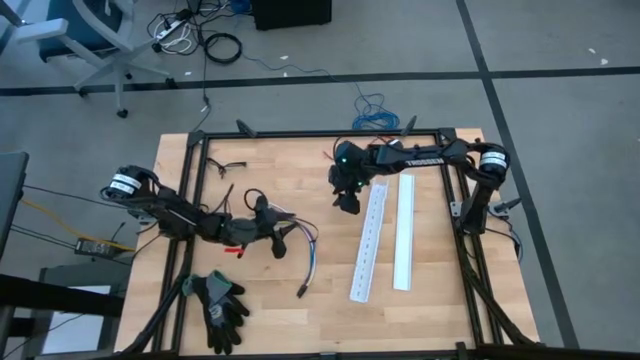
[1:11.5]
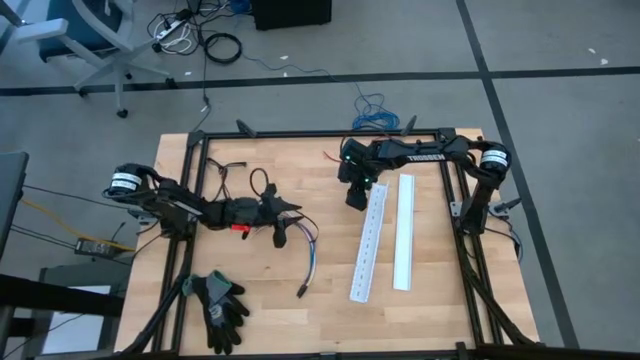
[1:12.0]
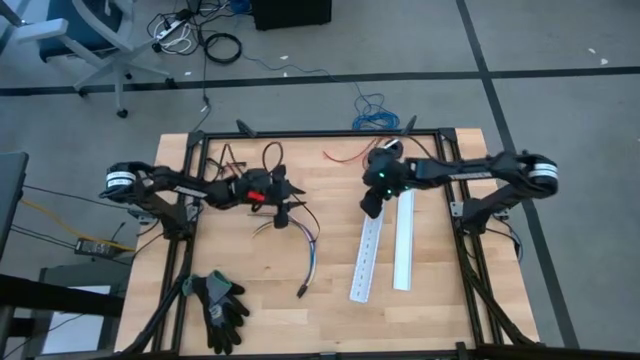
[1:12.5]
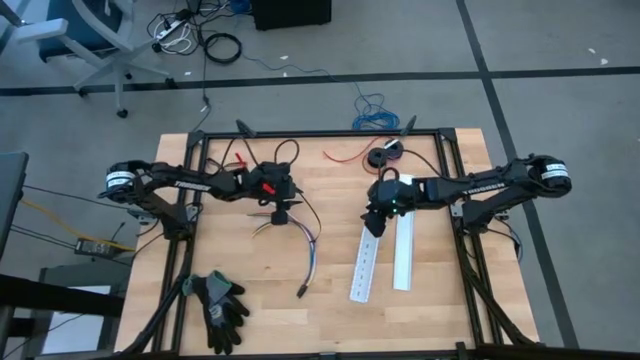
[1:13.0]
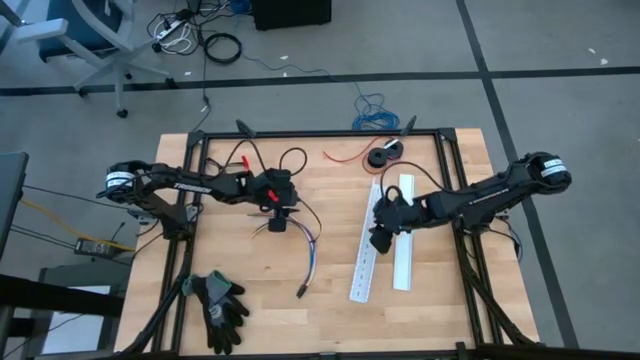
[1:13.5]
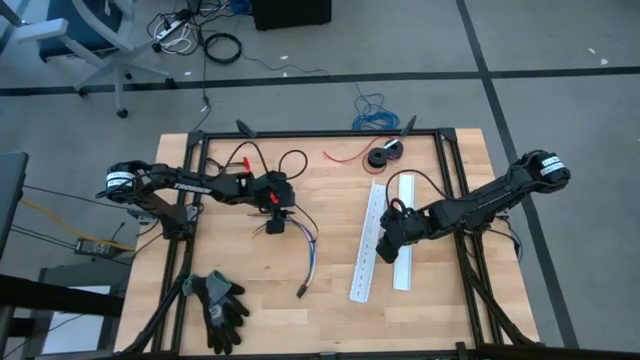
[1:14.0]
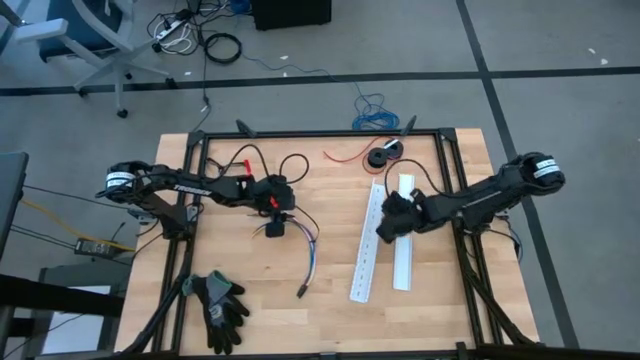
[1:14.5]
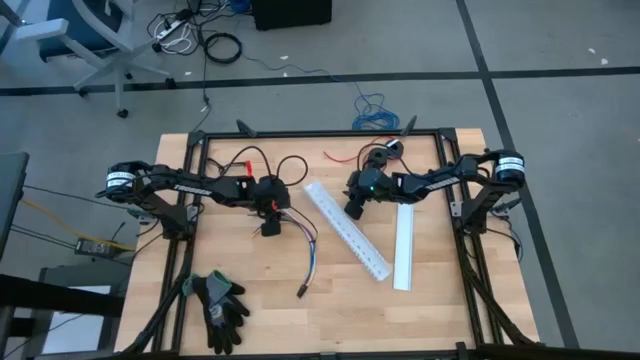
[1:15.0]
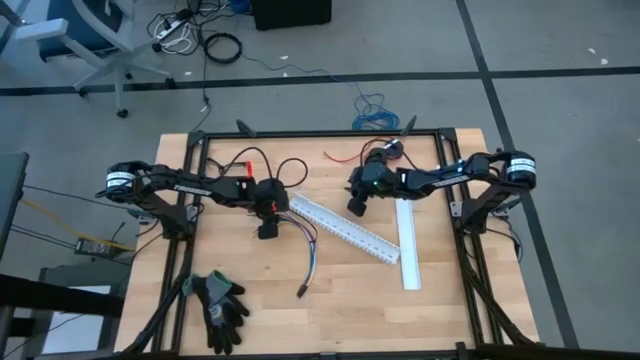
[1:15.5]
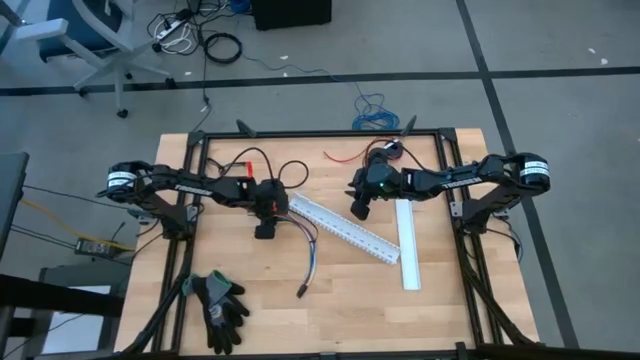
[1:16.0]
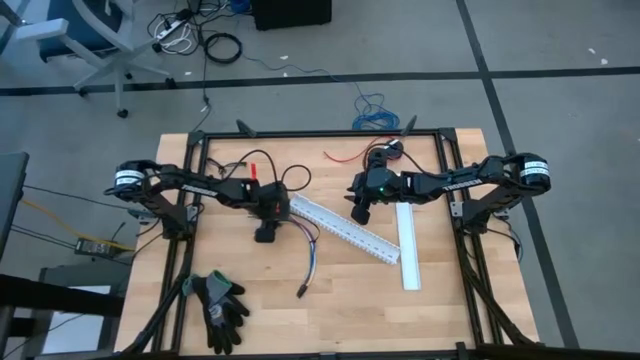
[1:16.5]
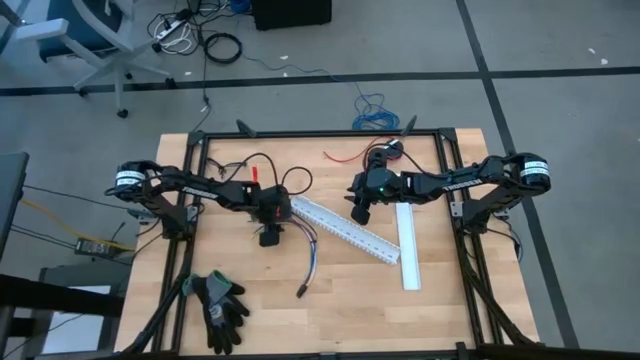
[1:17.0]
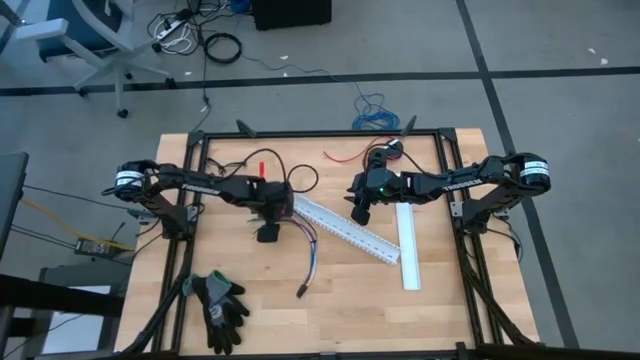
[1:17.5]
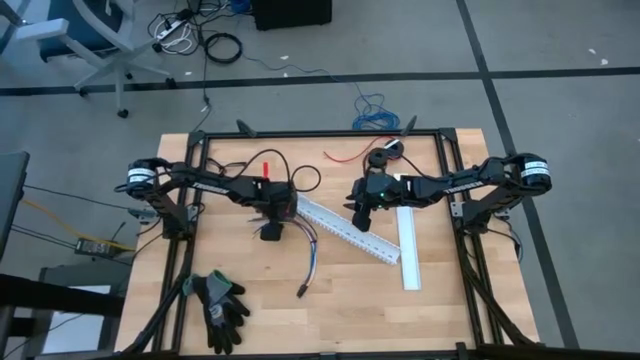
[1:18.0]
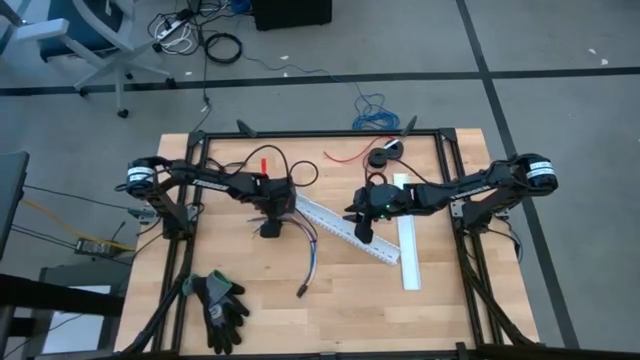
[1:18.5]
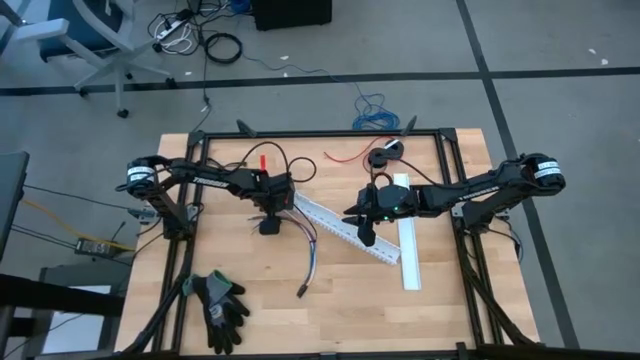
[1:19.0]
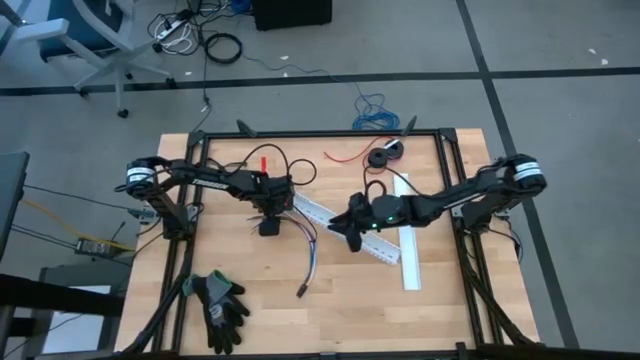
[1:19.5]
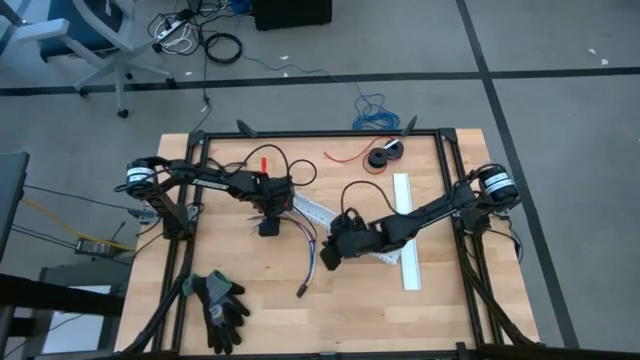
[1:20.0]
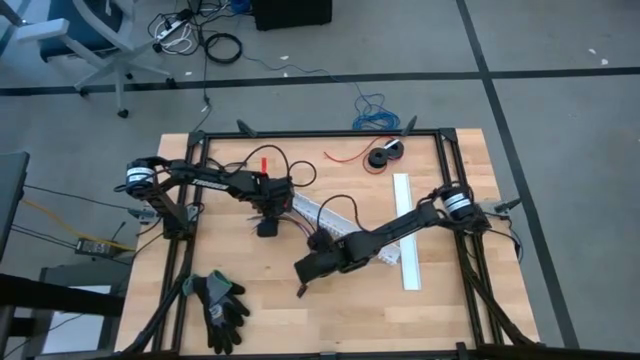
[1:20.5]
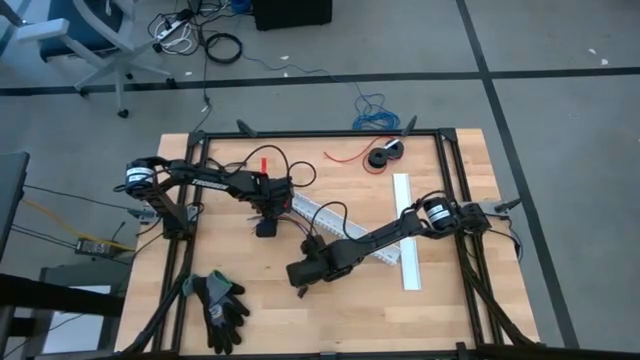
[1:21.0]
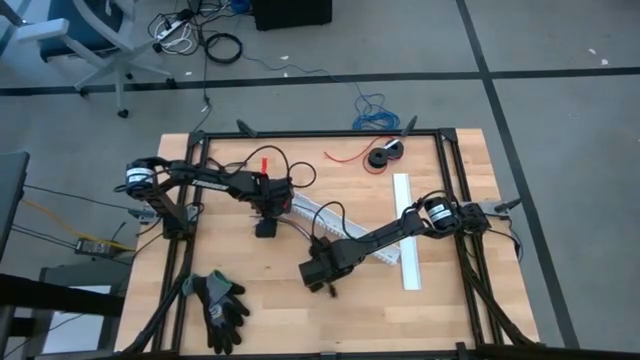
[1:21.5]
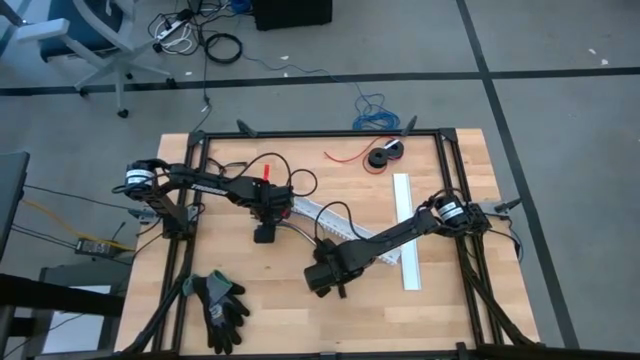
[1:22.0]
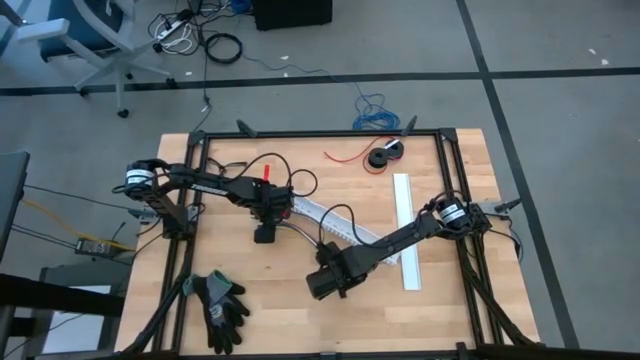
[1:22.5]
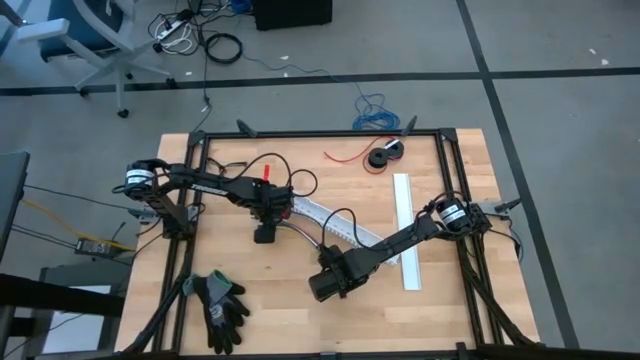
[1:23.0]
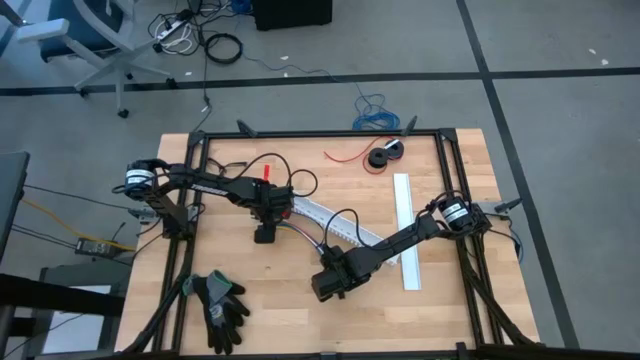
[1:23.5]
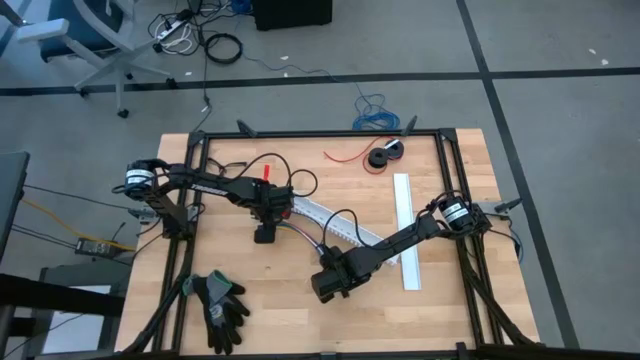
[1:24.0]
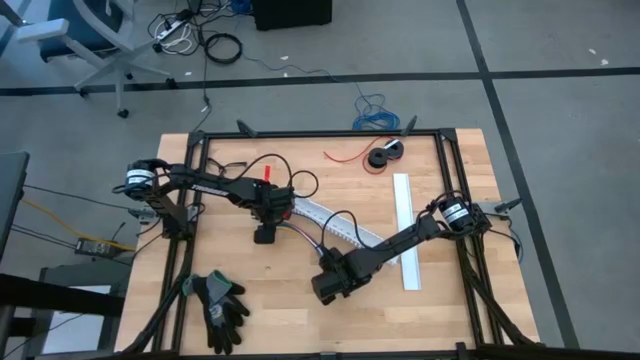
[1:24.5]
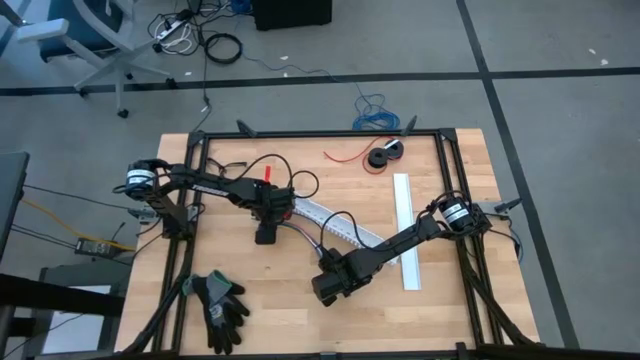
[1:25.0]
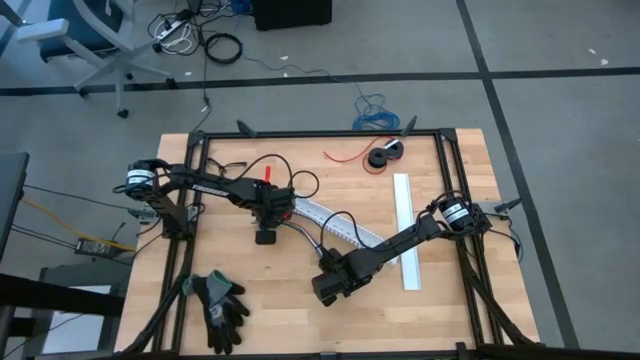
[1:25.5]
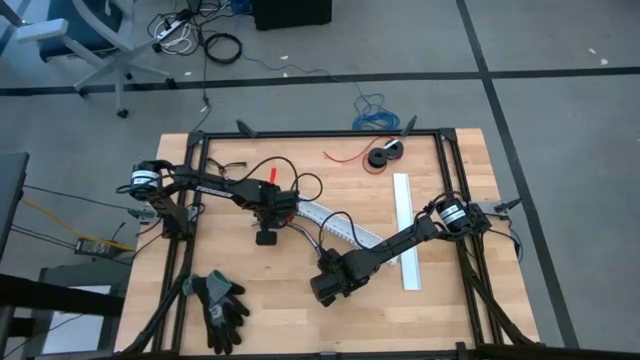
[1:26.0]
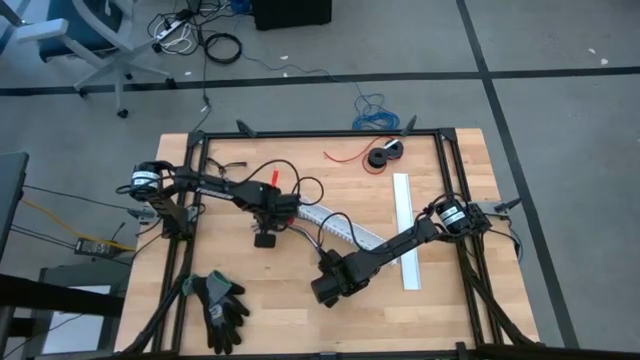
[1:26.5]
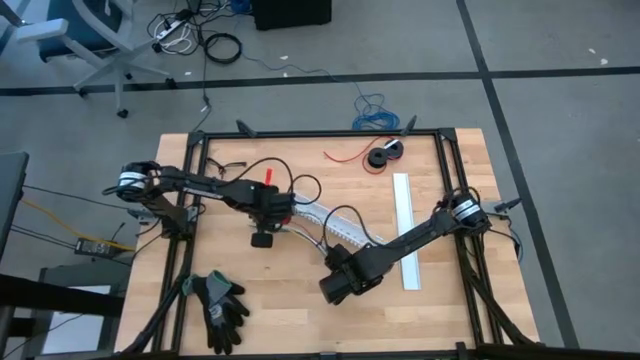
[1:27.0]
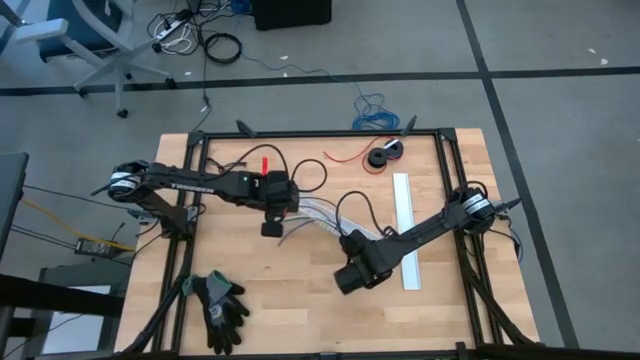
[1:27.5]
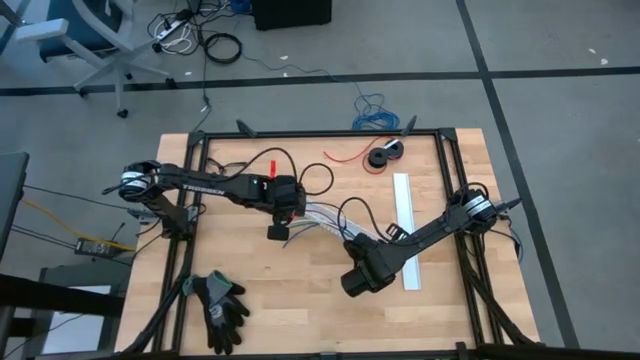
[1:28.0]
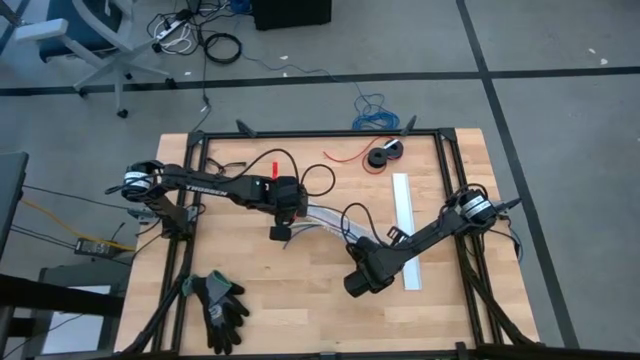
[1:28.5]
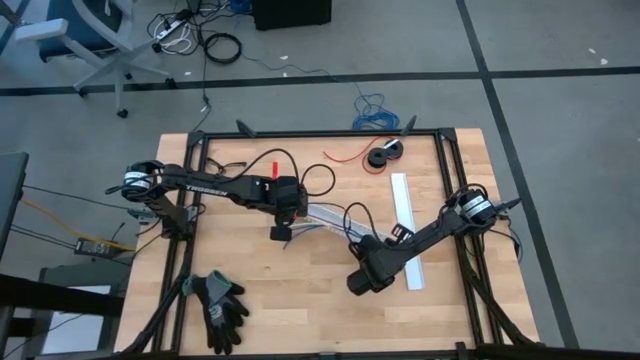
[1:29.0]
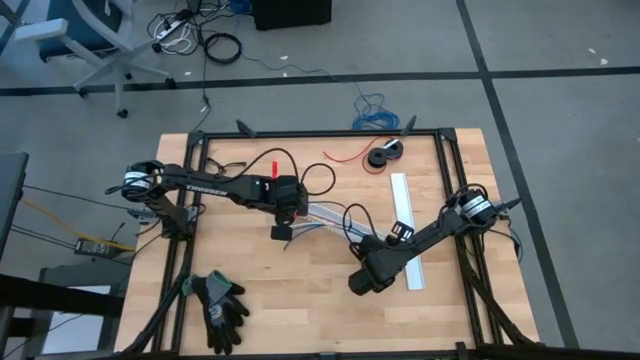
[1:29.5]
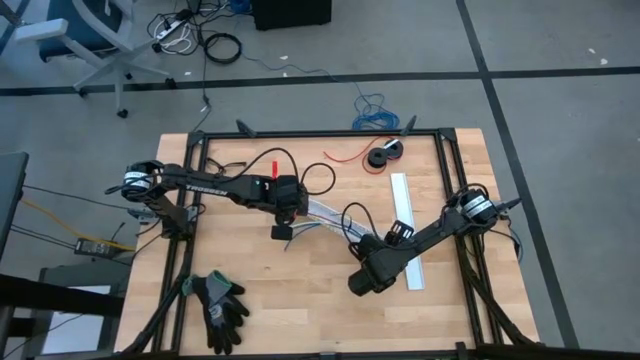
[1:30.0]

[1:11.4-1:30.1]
Task: Ziptie cables
Put the zip tied cable wires into the white cable duct
